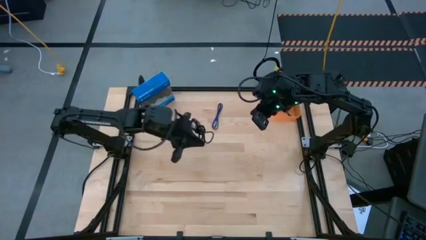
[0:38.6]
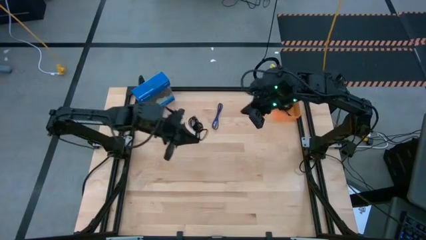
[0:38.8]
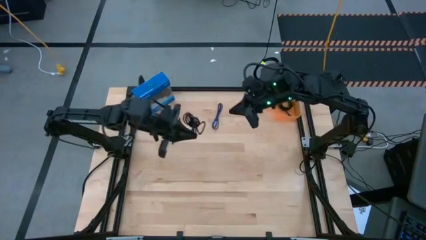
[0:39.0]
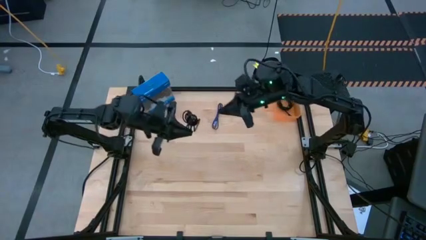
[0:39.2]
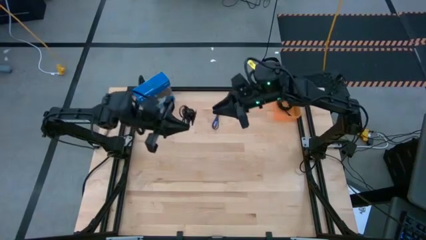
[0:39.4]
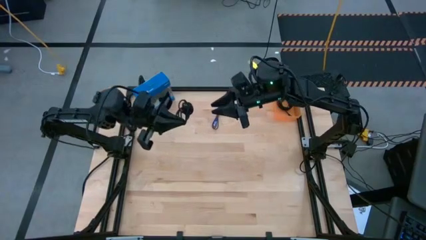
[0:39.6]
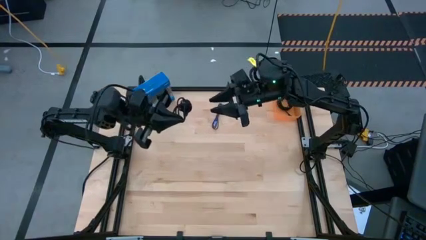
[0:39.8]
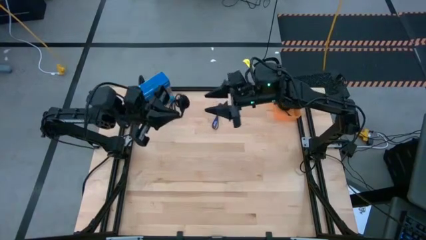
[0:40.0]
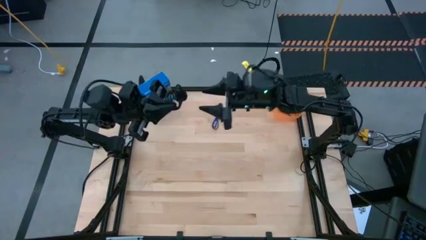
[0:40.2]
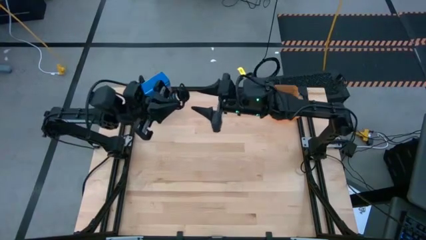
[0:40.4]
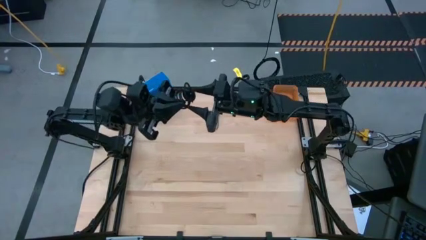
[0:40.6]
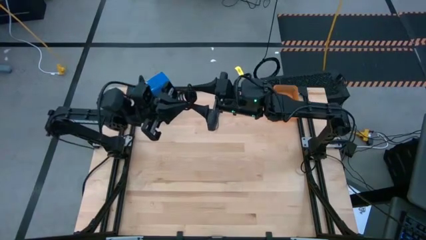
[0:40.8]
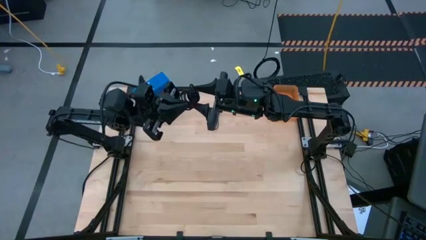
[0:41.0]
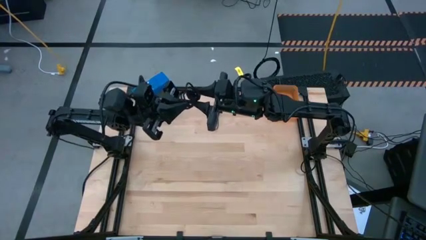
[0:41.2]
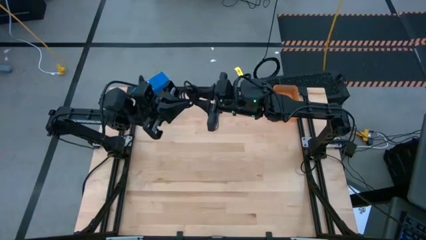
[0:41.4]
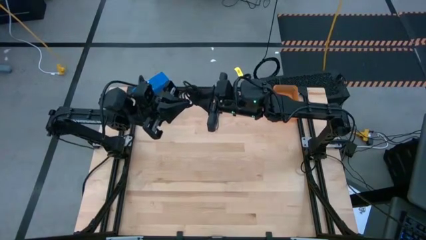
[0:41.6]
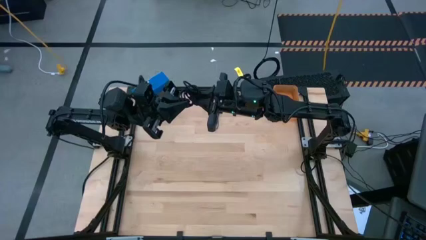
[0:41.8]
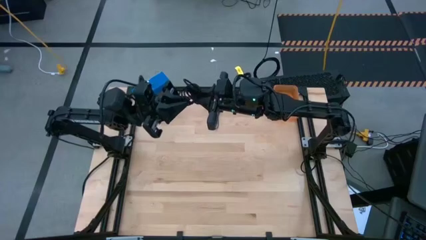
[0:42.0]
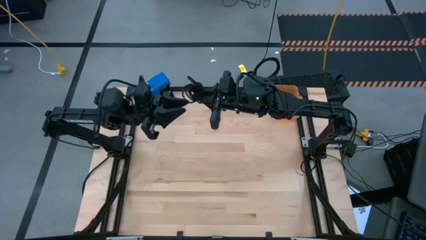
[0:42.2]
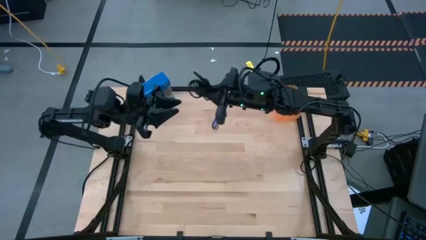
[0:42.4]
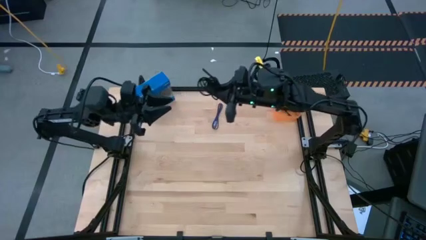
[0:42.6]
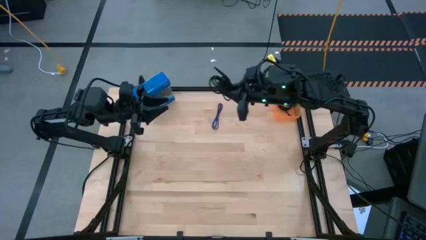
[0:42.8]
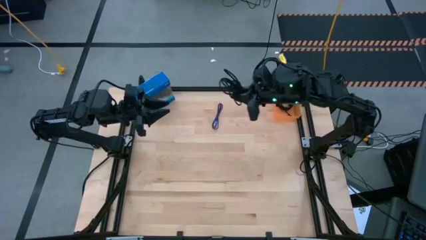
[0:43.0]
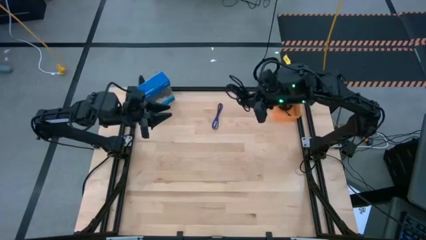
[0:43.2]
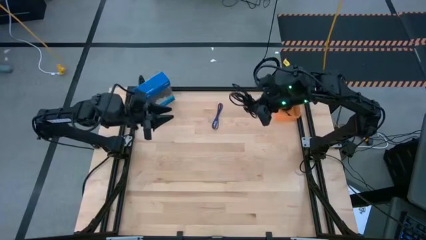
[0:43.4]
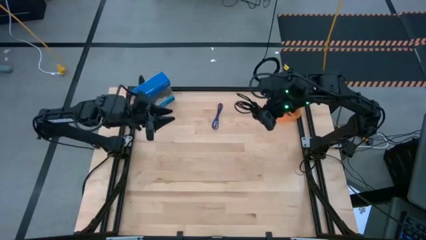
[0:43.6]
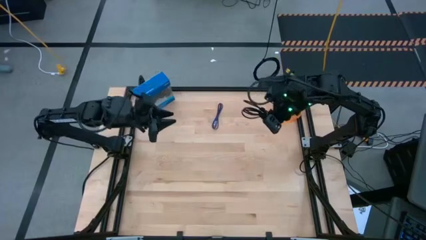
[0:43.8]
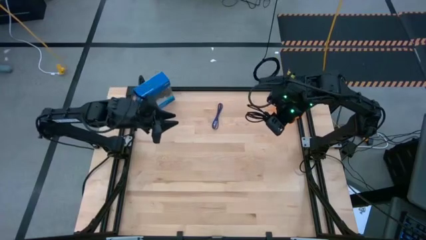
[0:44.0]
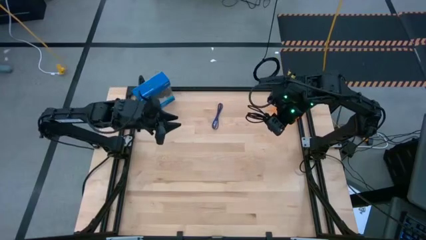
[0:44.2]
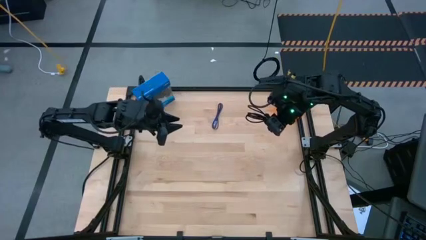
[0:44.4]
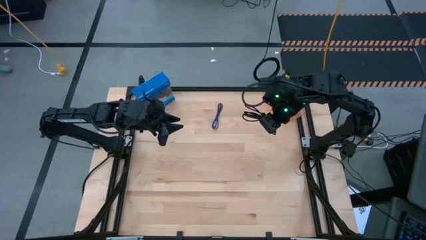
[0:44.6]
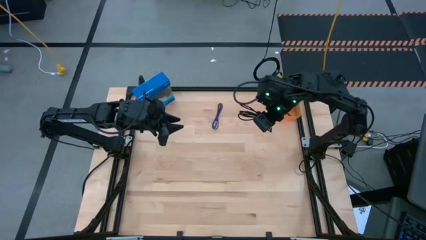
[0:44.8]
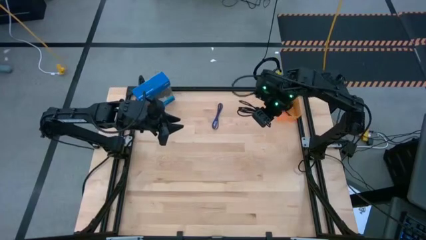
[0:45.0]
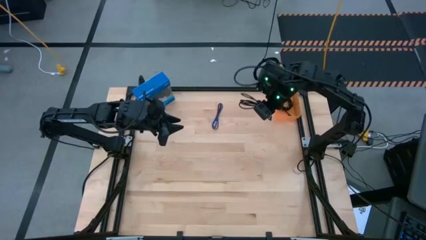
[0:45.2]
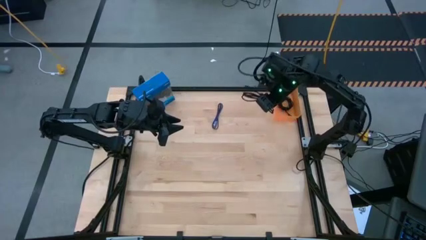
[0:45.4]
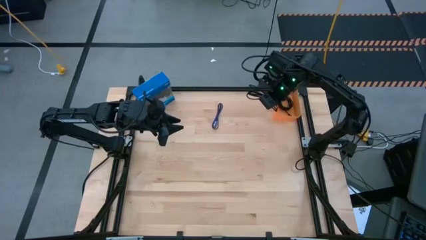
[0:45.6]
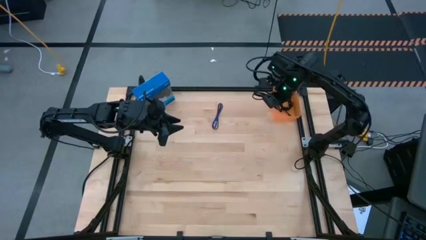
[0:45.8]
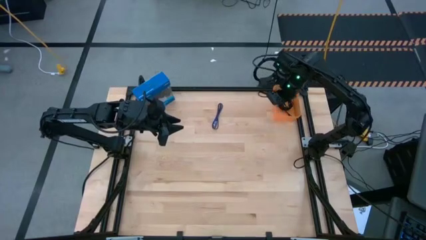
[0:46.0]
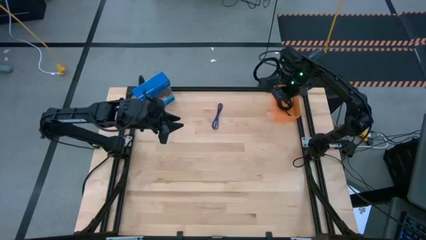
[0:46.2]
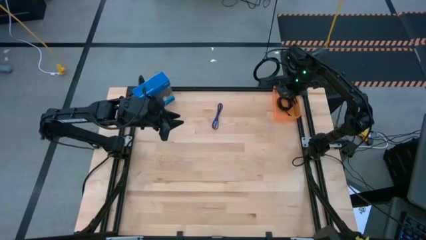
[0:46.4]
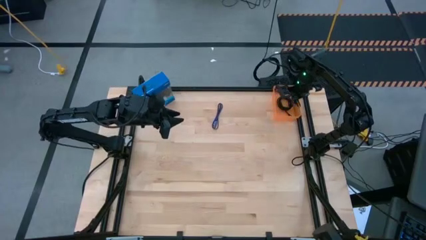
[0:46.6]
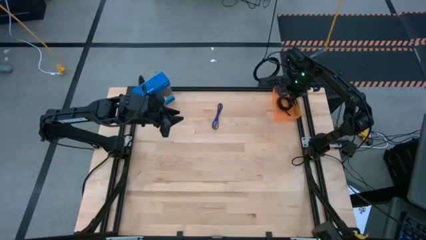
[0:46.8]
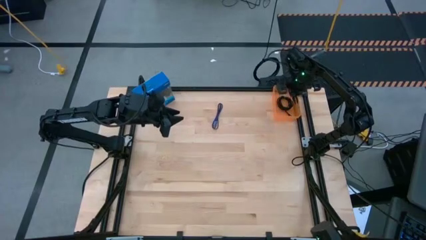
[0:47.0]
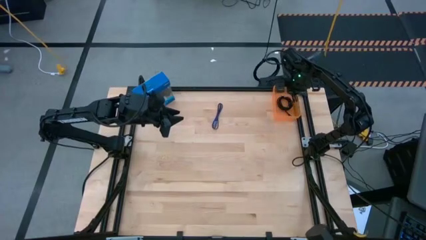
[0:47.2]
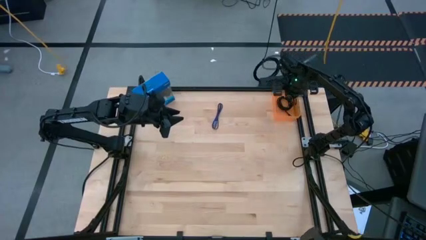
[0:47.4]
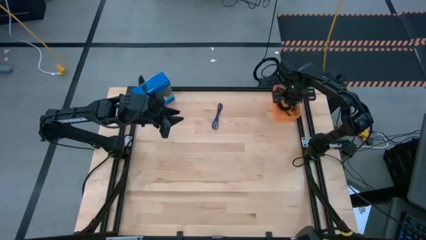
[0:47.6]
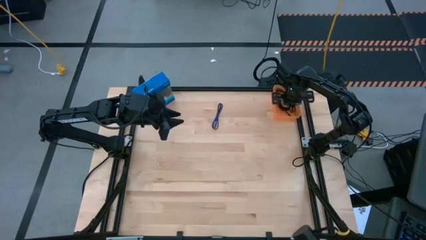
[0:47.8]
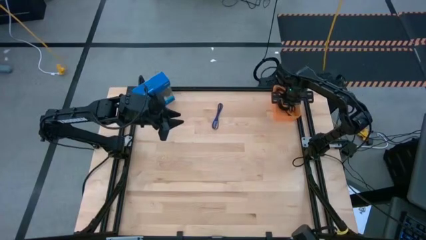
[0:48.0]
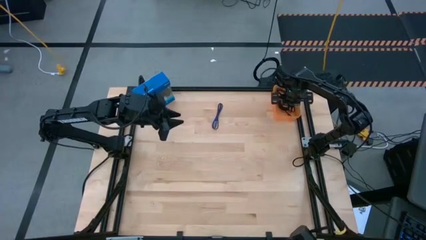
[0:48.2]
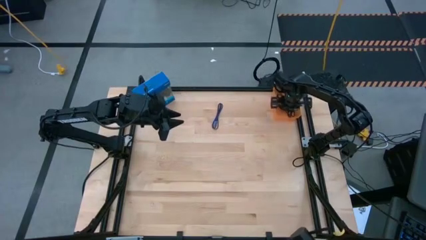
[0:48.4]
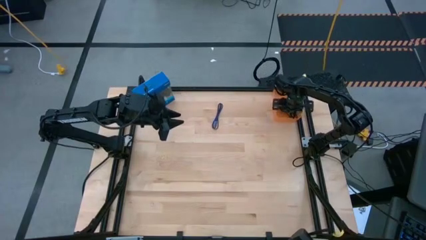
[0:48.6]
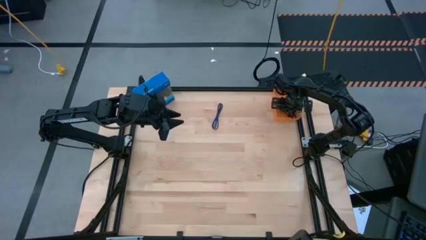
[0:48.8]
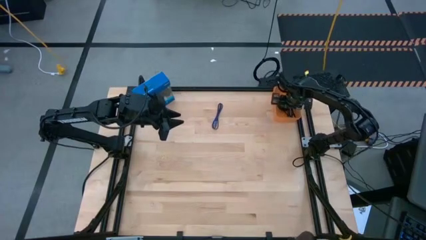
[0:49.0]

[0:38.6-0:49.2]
Task: Pick and place USB-C Cables
Put the black charger cable into the orange bin
